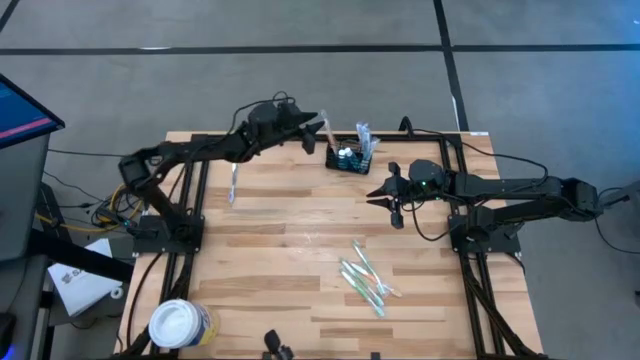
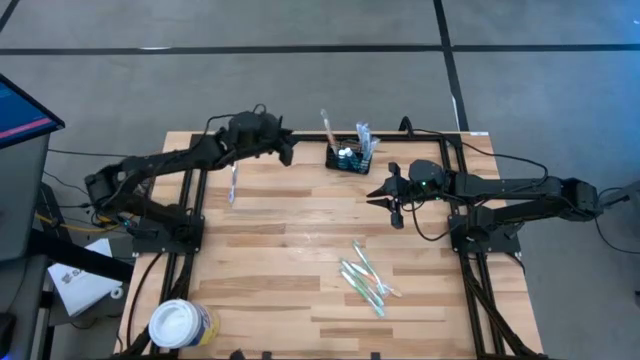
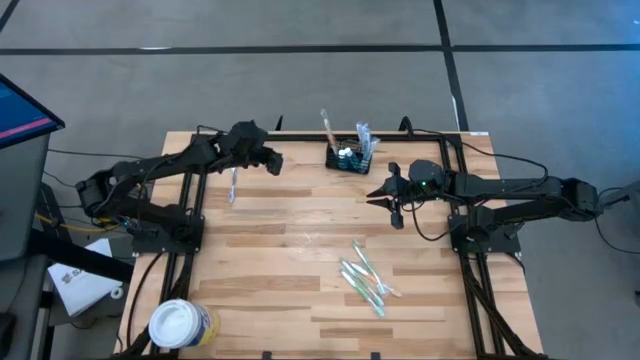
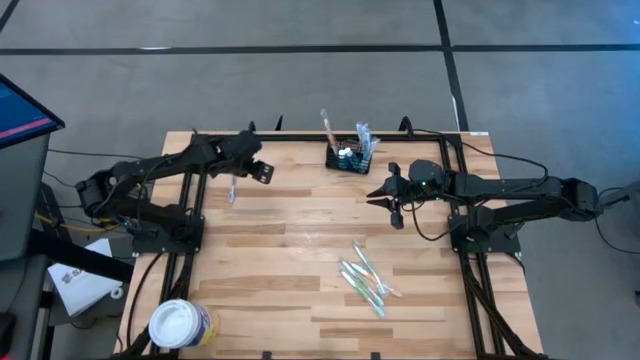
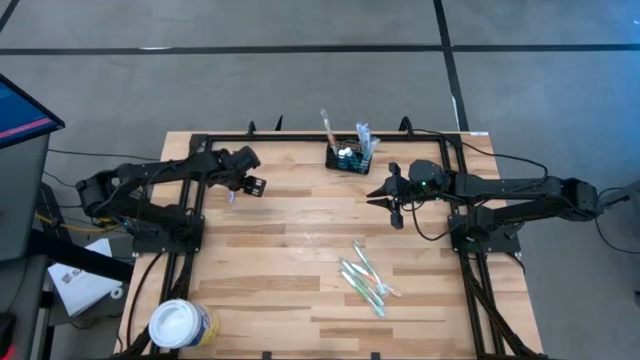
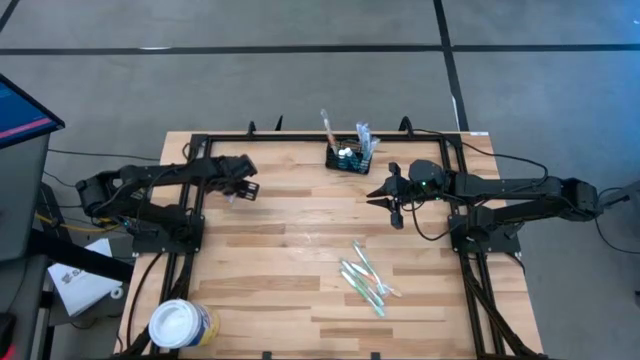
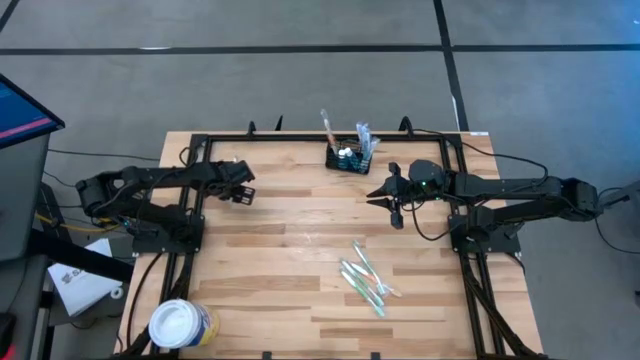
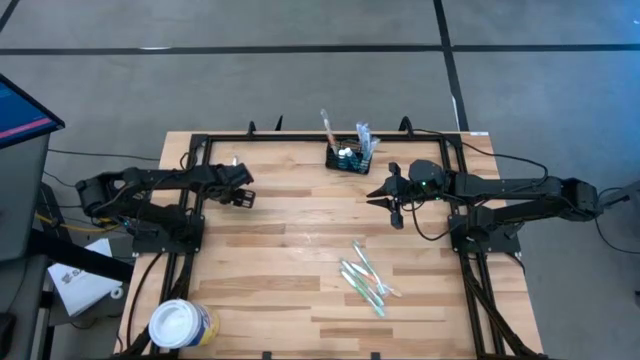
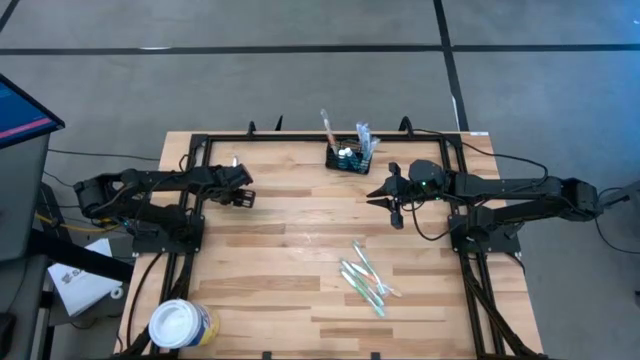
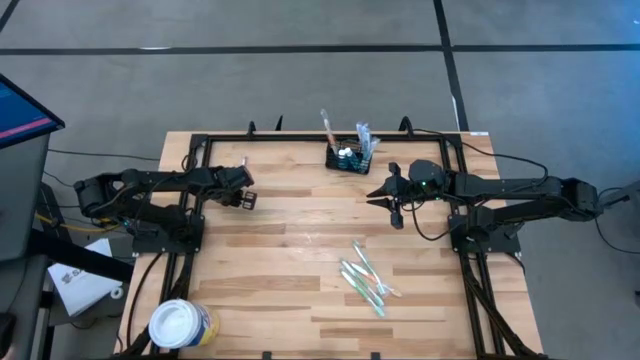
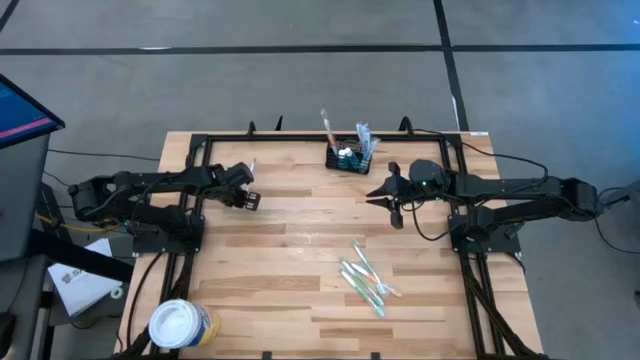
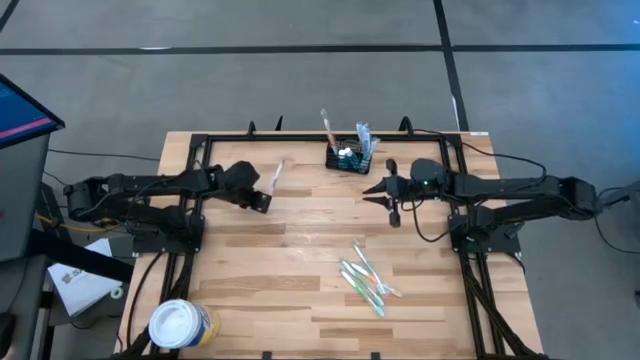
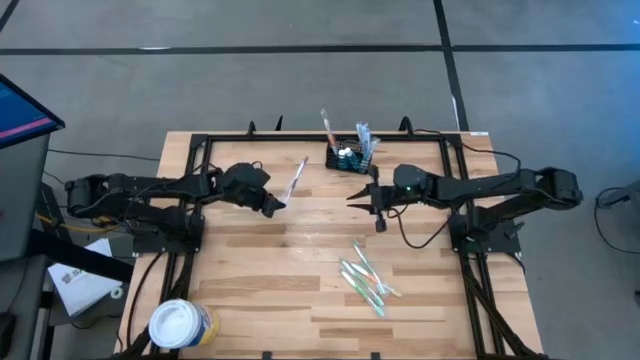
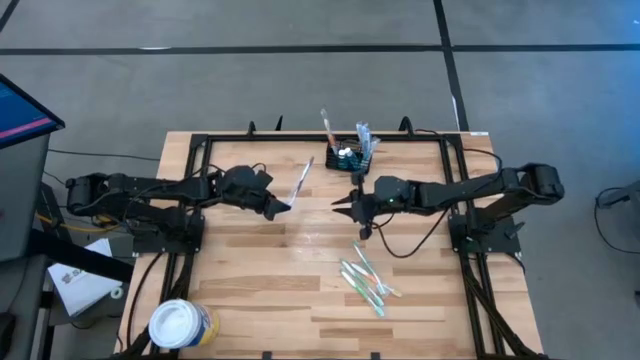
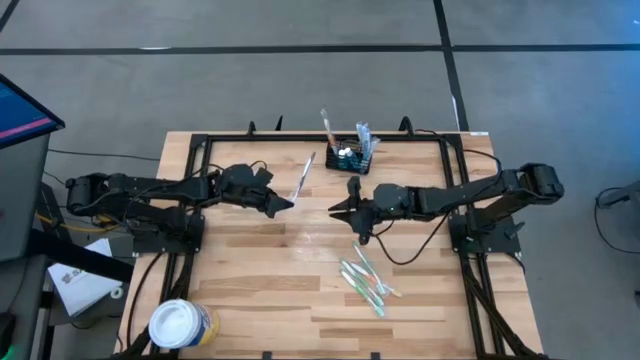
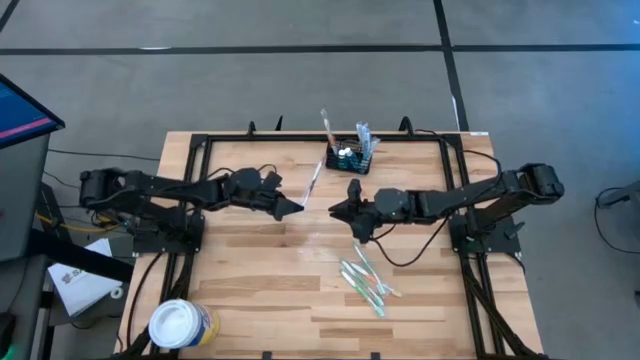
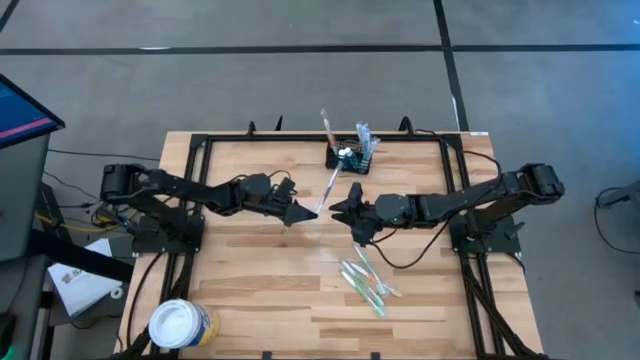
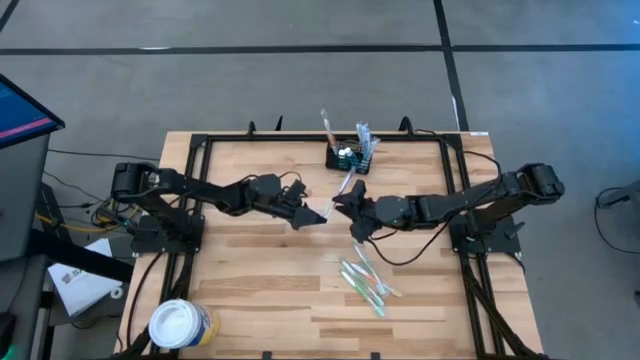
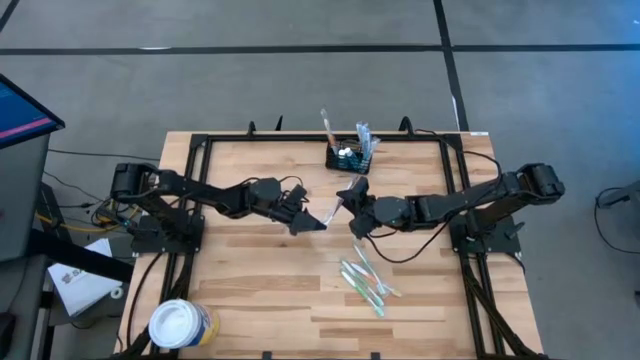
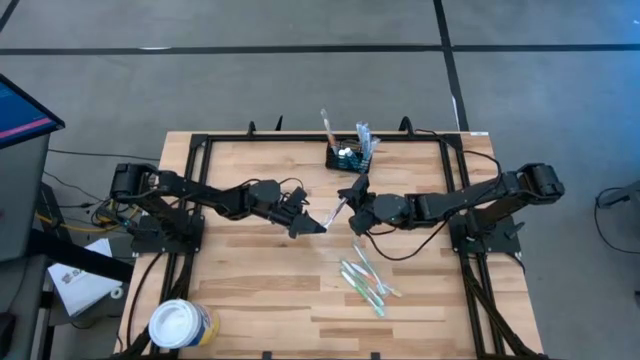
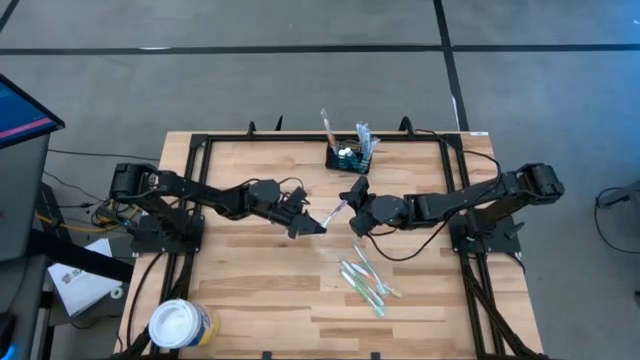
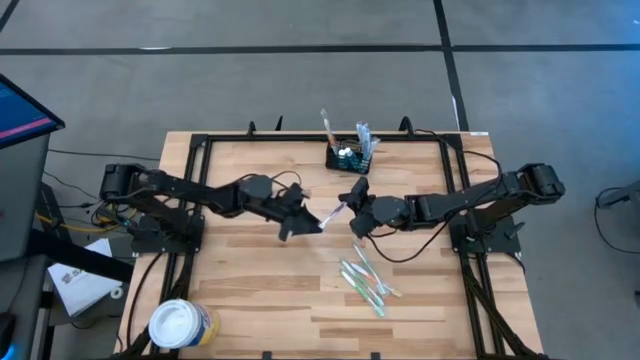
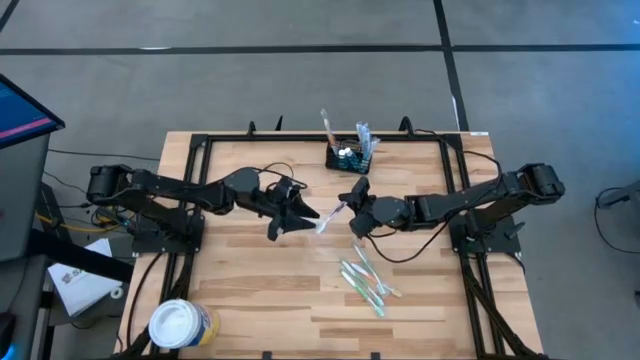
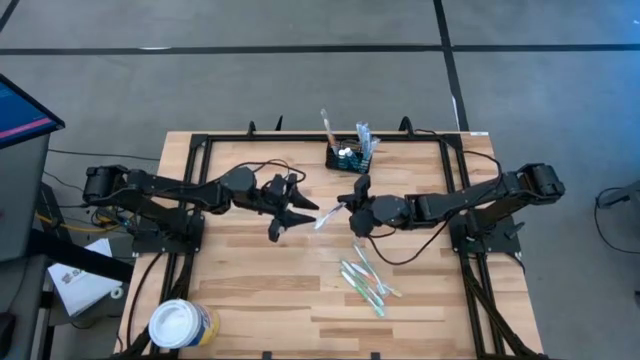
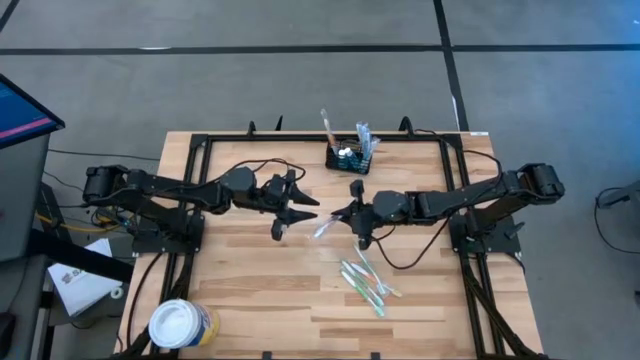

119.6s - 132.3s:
Task: Pick & Place toothbrushing station
Put the purple toothbrush into the mesh organizer

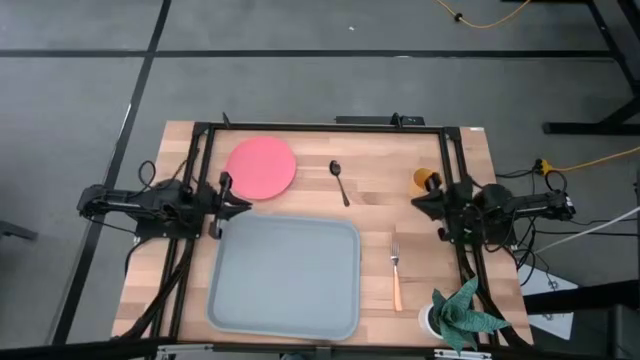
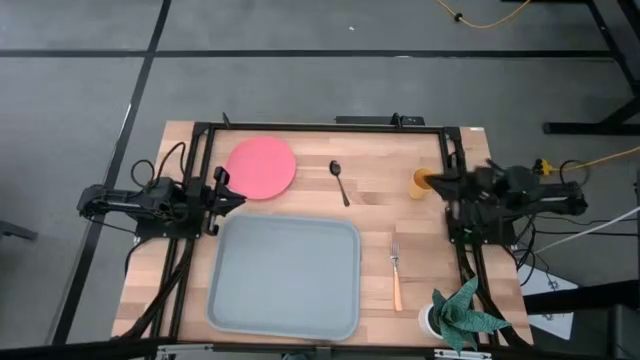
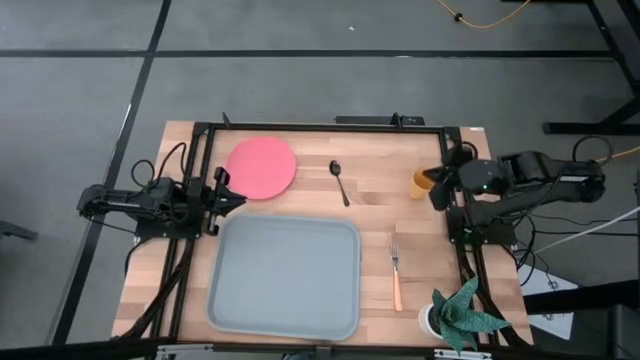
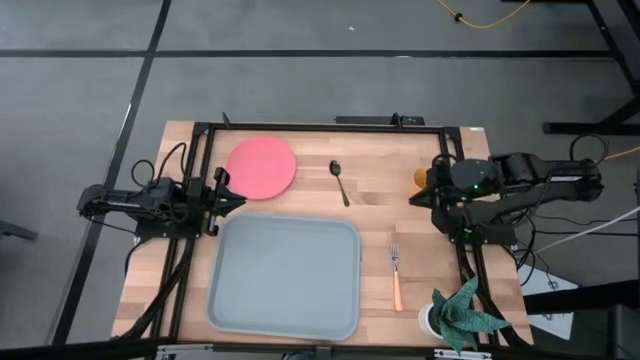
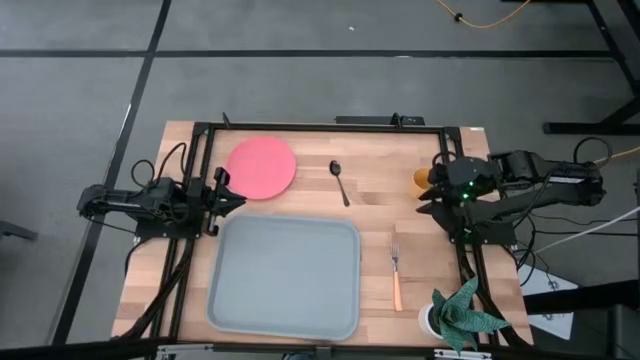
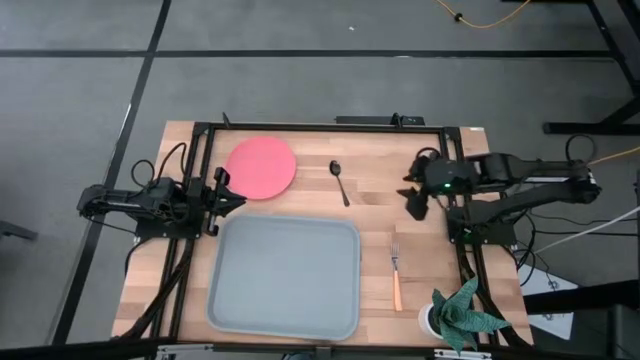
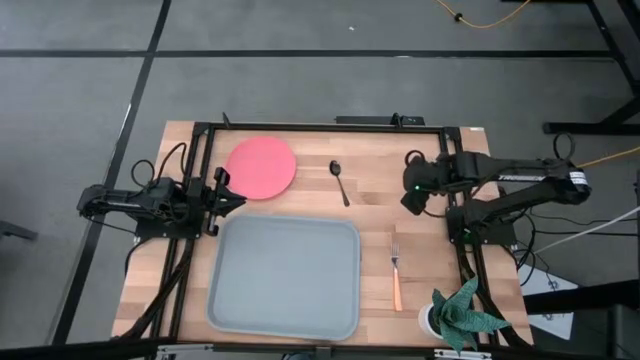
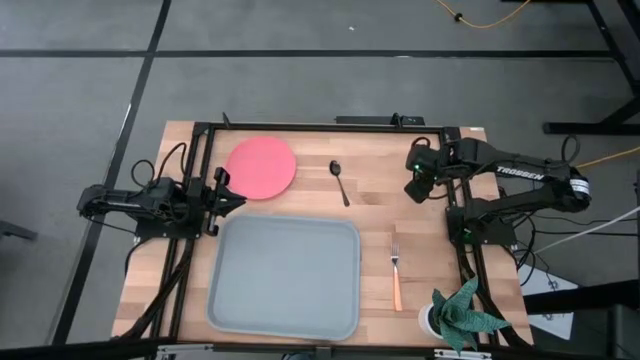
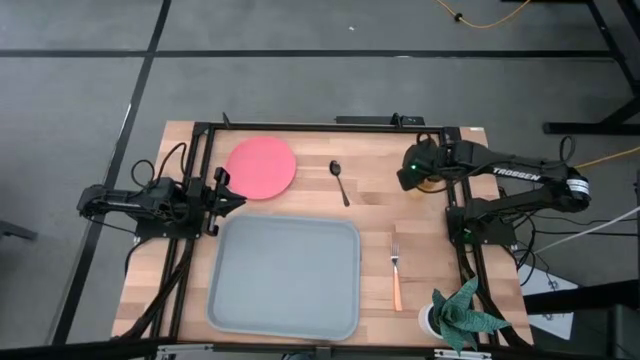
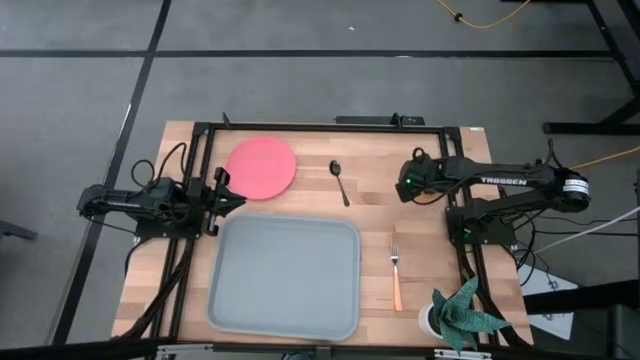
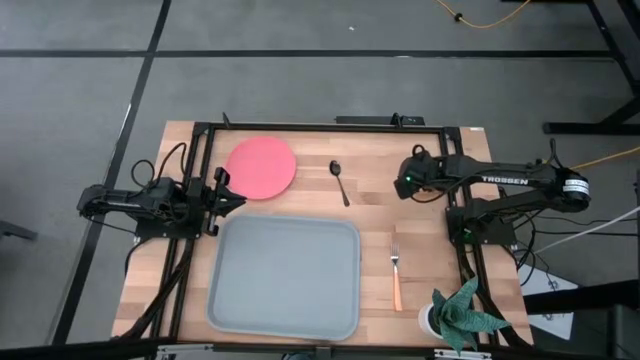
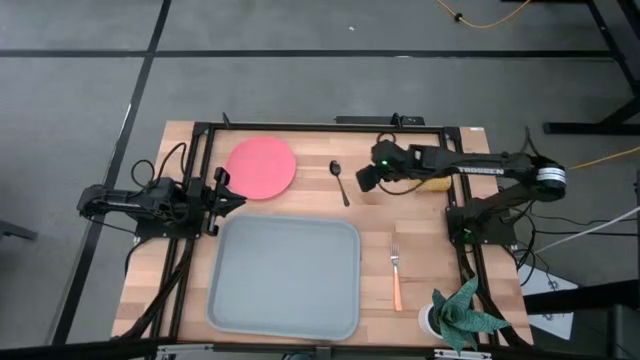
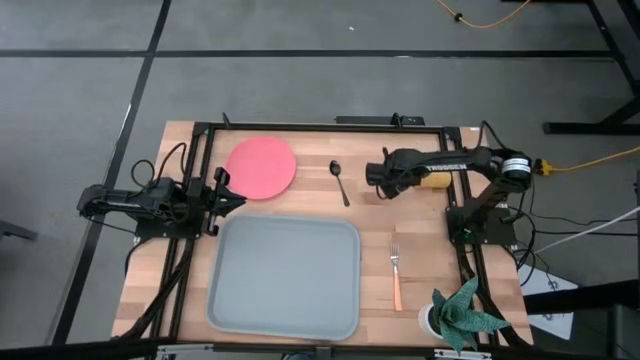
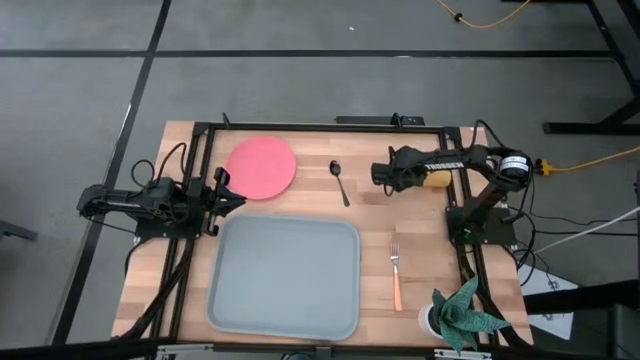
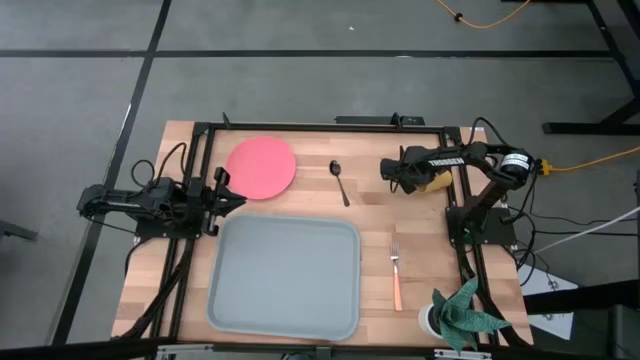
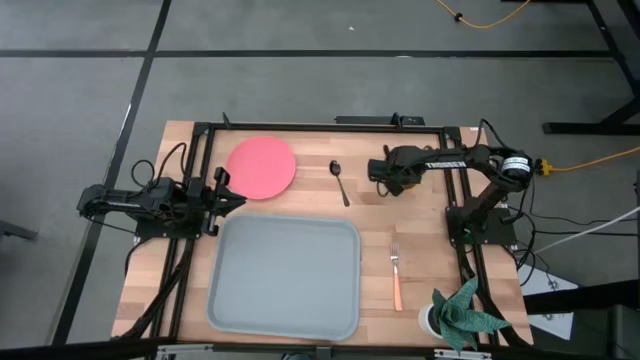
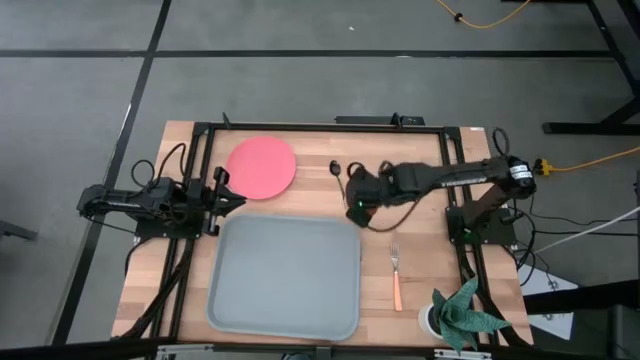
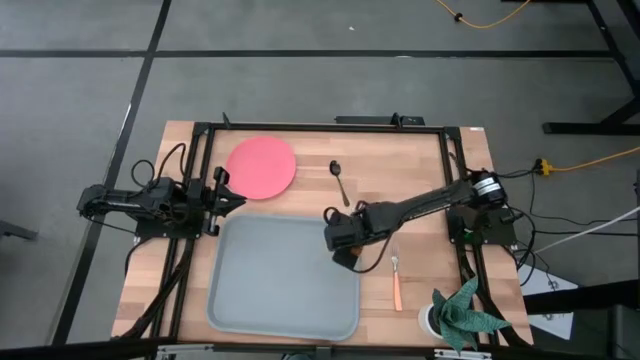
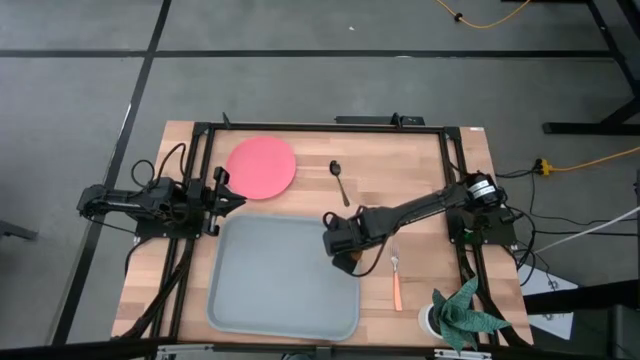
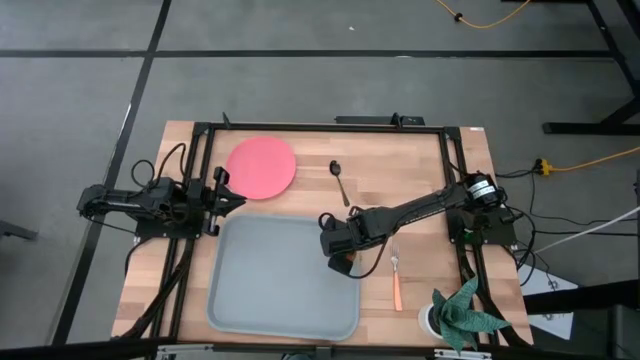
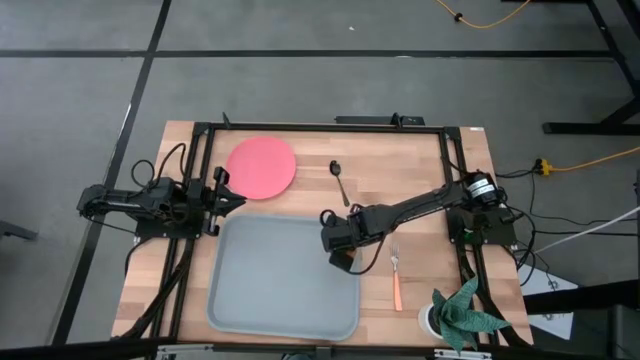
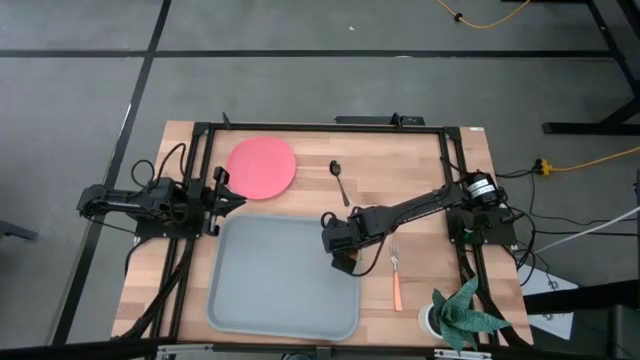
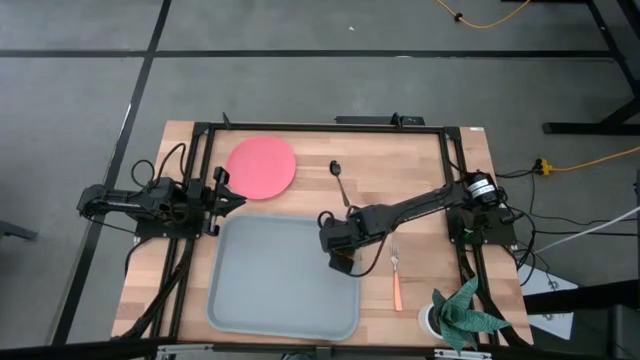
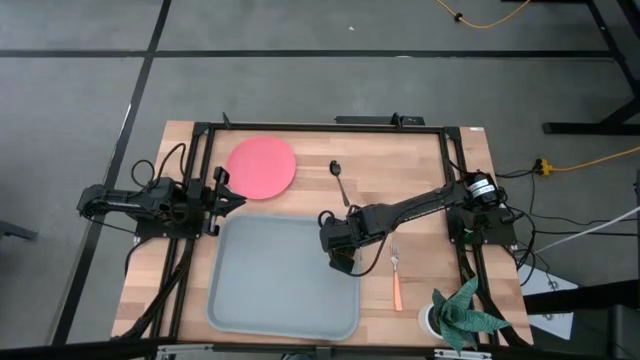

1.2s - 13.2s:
Task: Pick and place plate/cup/fork/spoon on tray
Put the yellow cup on the the gray tray
